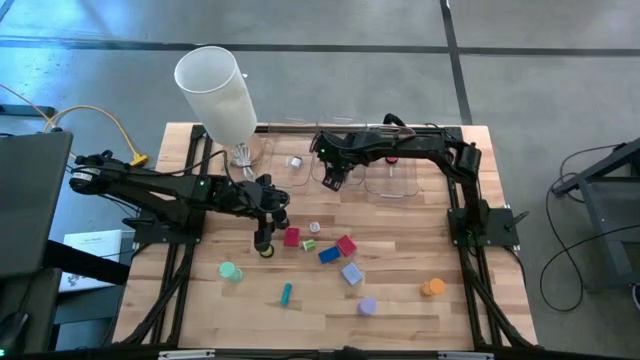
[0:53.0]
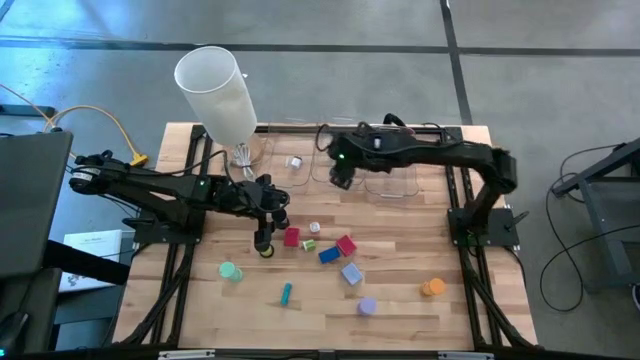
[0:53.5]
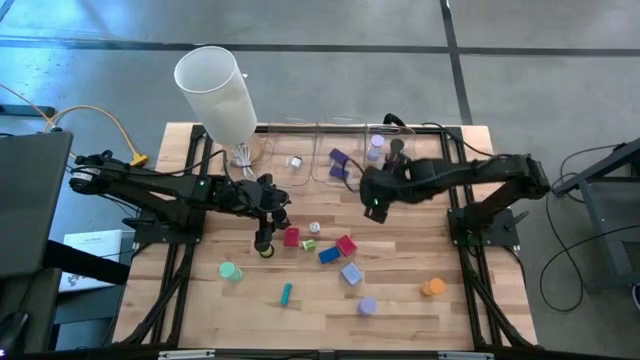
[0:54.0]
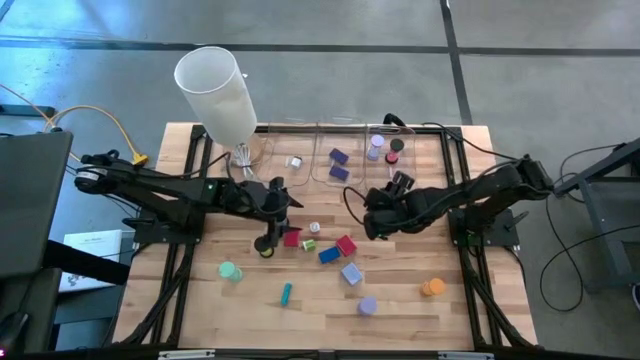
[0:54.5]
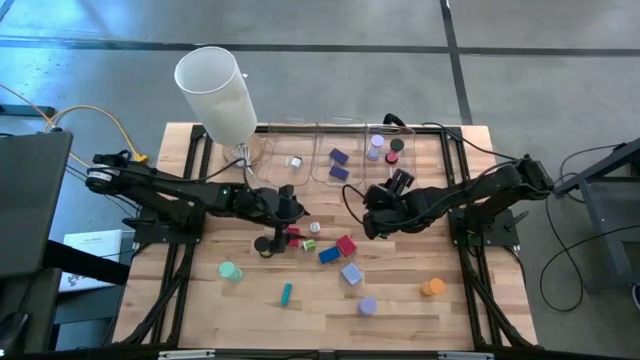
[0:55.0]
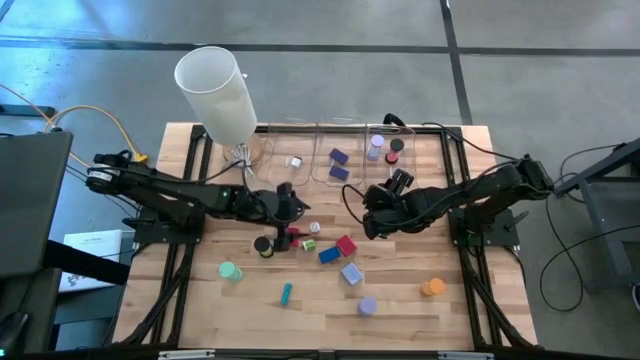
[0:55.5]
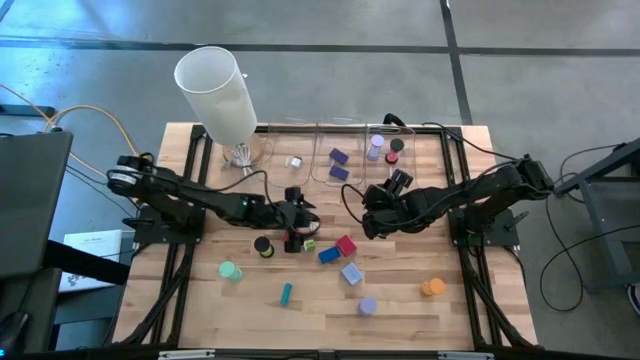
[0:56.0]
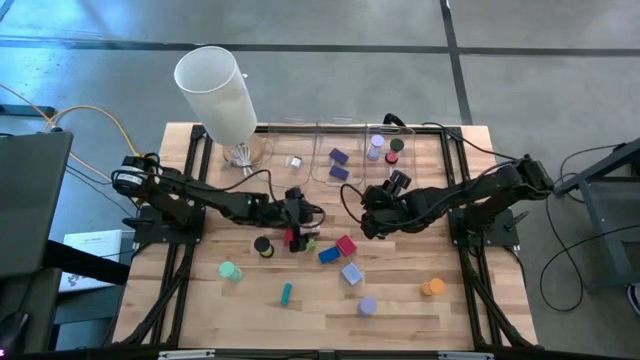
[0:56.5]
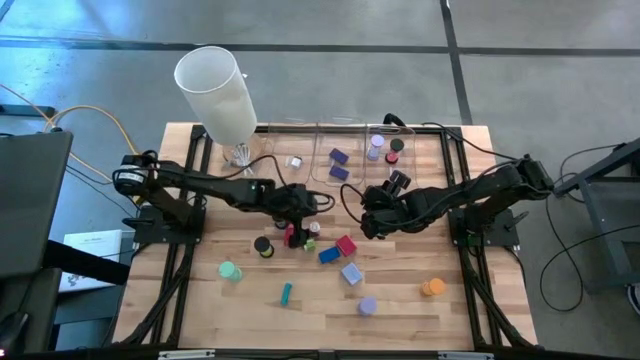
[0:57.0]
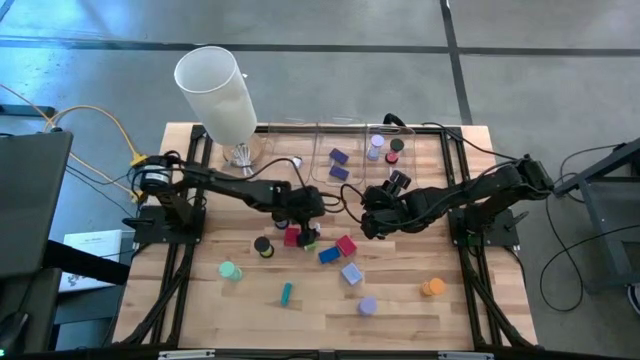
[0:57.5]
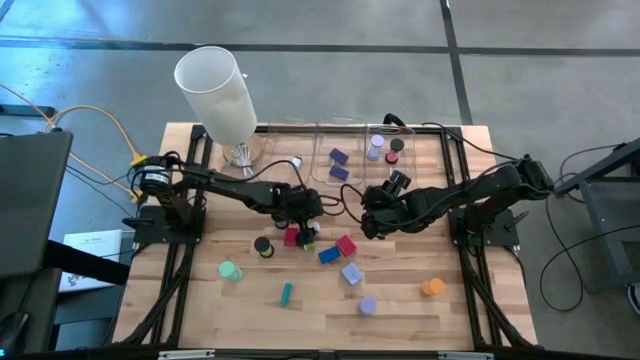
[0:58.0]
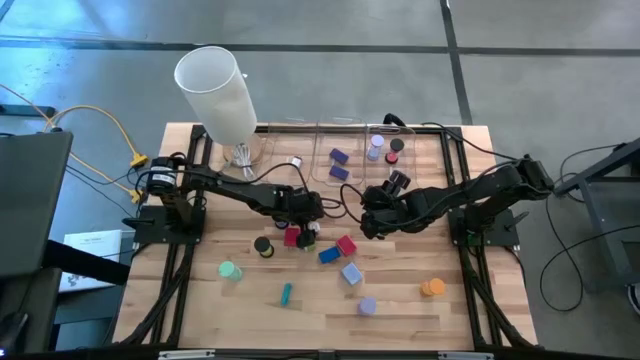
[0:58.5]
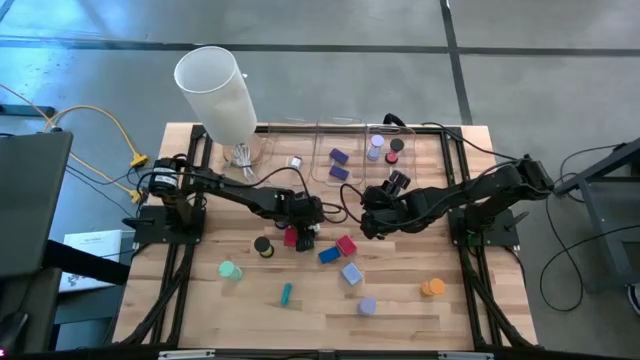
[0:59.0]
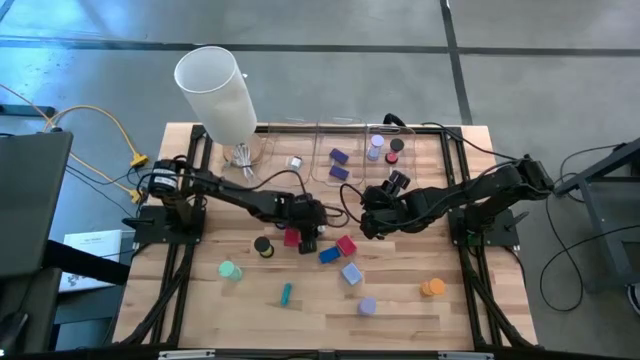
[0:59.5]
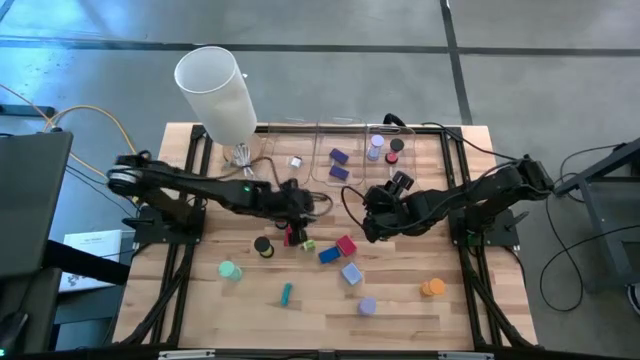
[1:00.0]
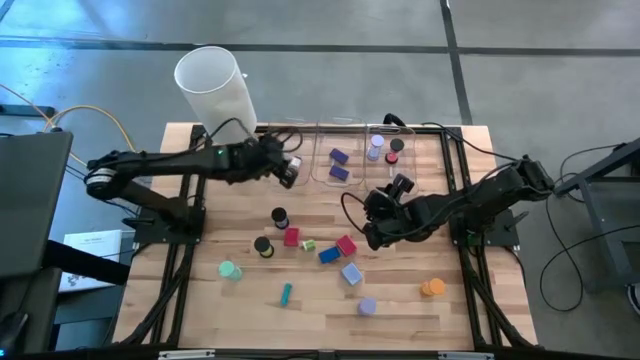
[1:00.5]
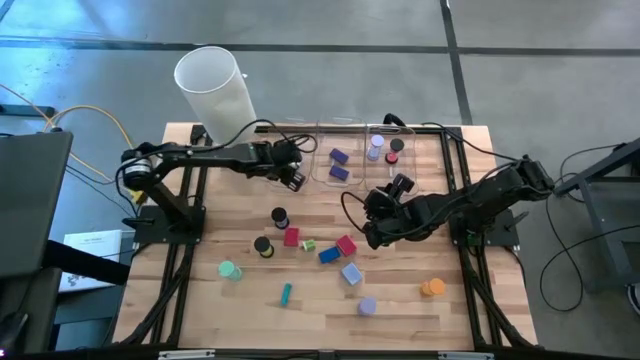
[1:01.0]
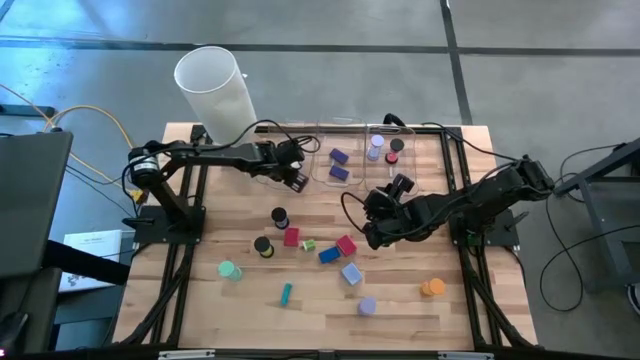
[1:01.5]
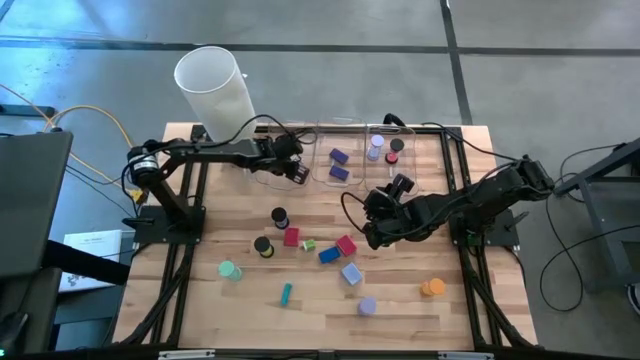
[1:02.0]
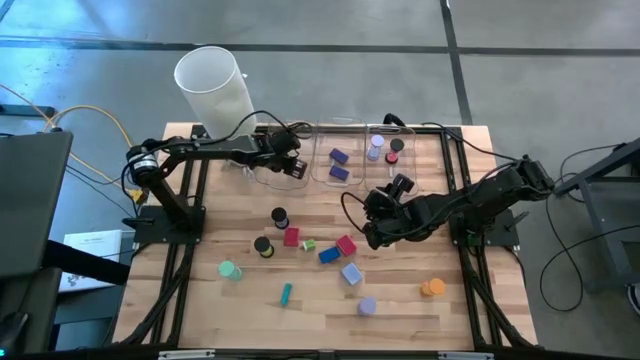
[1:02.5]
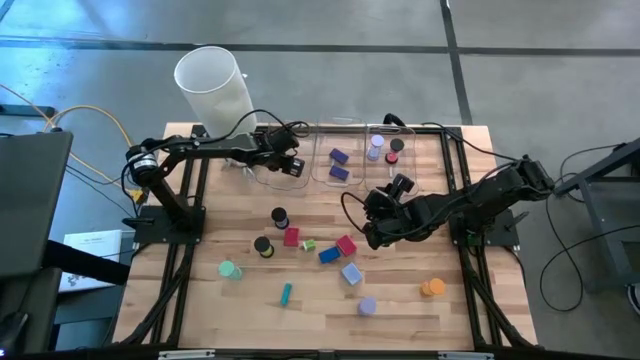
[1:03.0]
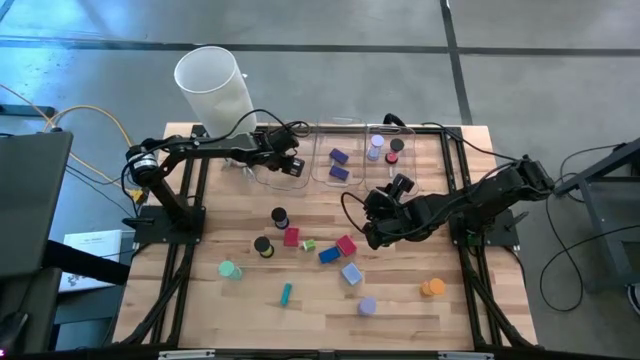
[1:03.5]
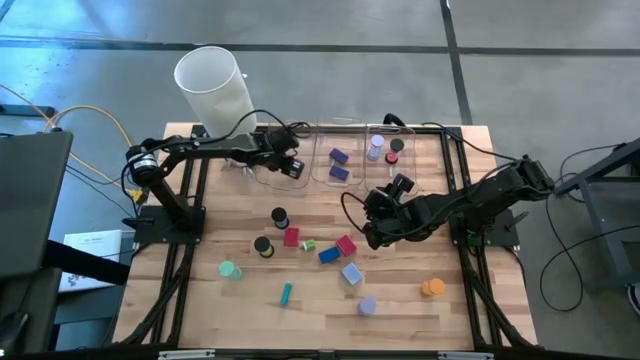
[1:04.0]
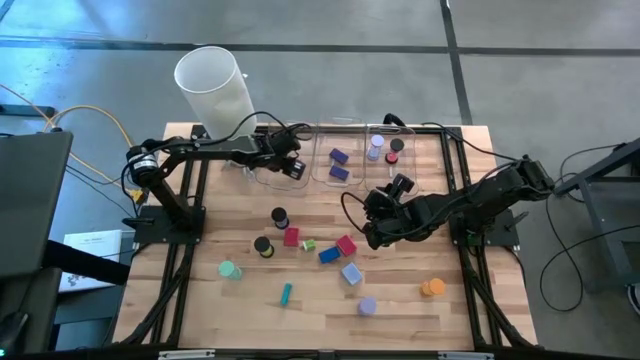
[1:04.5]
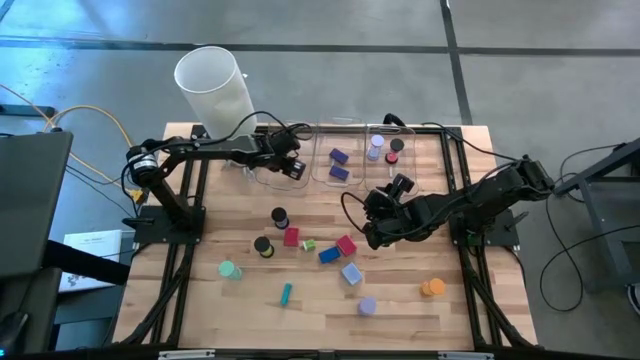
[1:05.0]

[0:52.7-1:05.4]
Task: Pick & Place Office items
Put the pink charger adapter into the left transparent bin

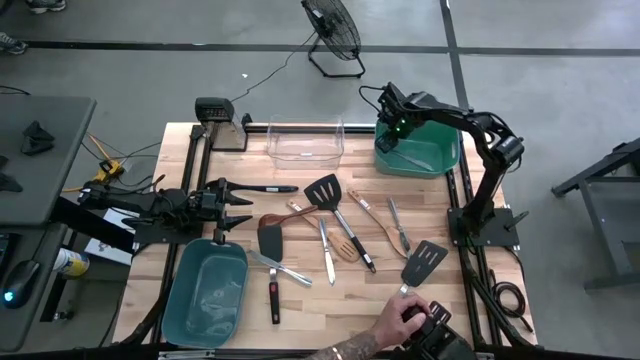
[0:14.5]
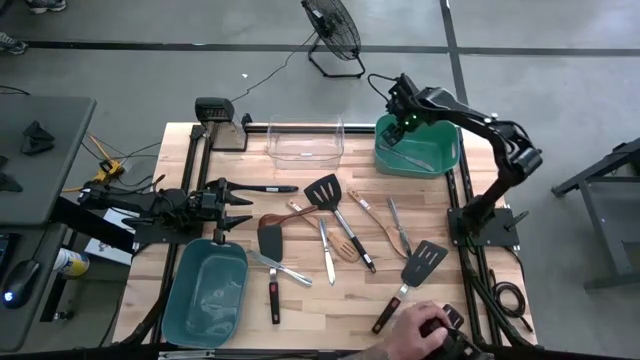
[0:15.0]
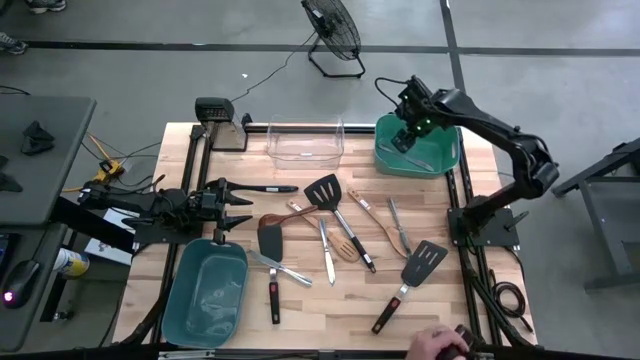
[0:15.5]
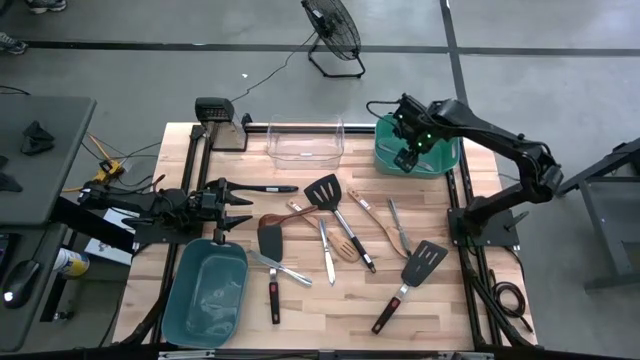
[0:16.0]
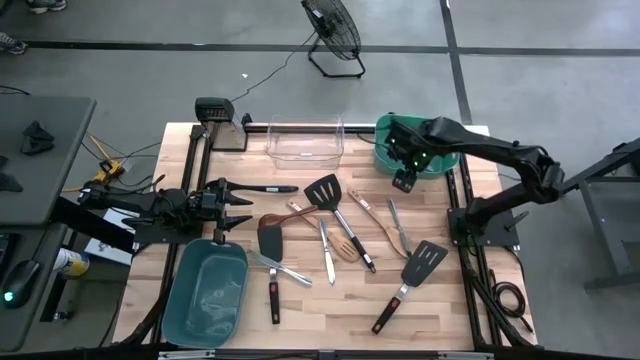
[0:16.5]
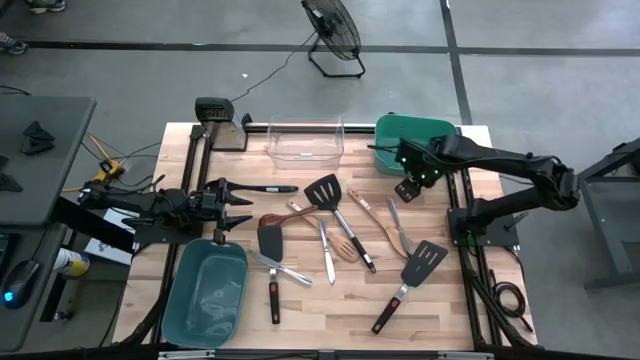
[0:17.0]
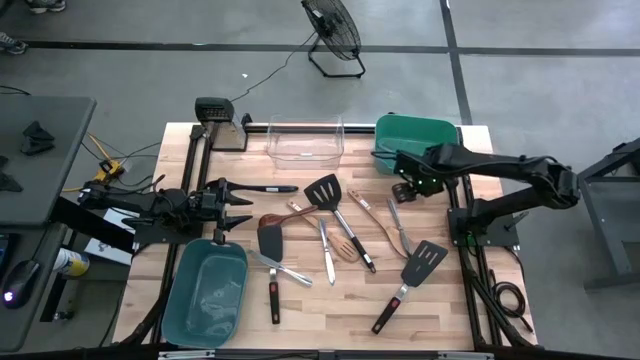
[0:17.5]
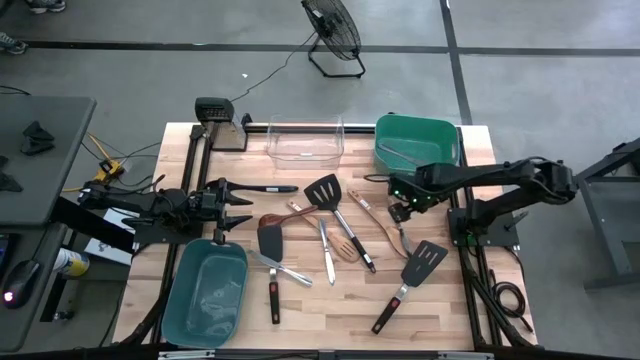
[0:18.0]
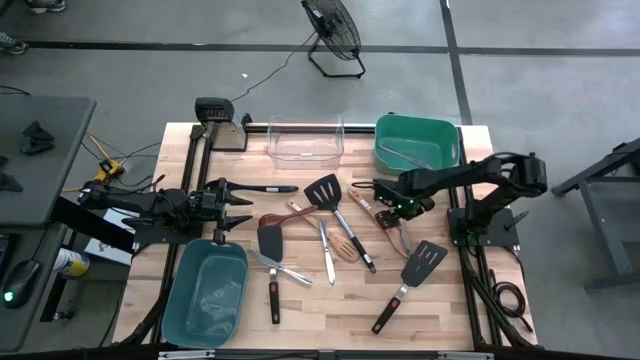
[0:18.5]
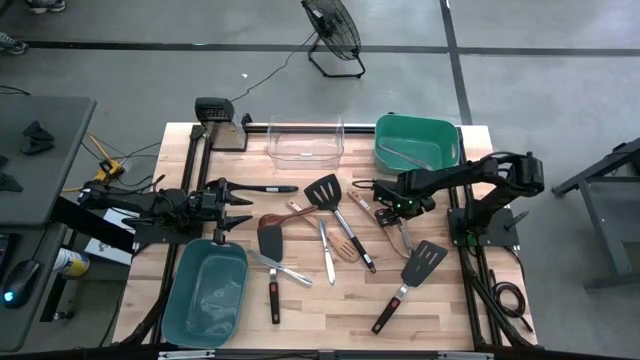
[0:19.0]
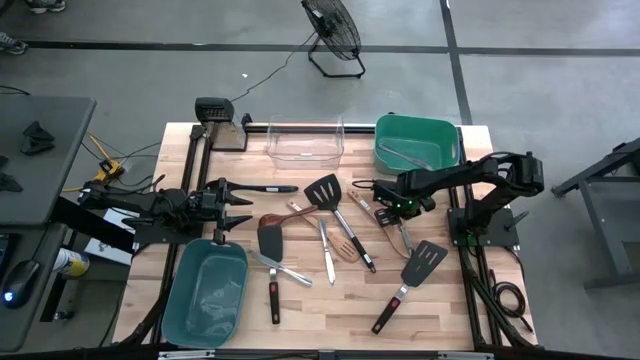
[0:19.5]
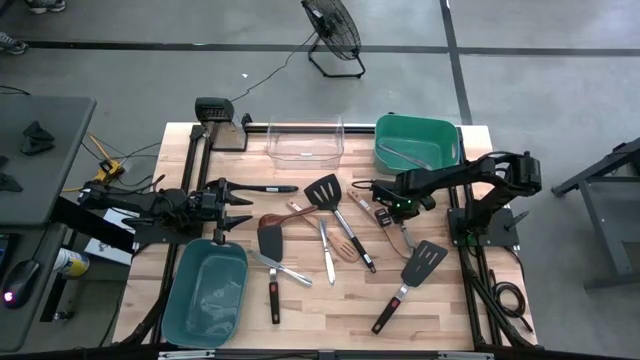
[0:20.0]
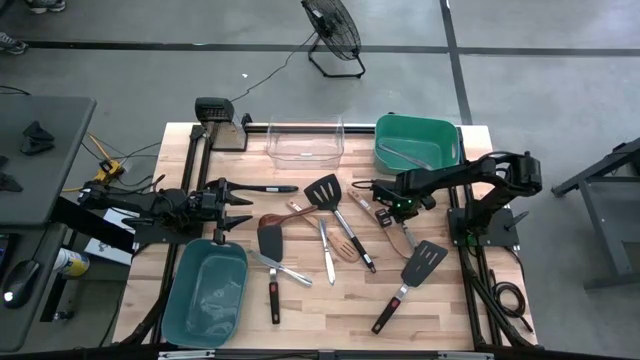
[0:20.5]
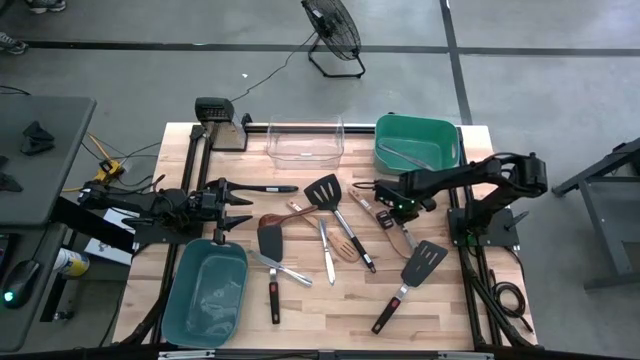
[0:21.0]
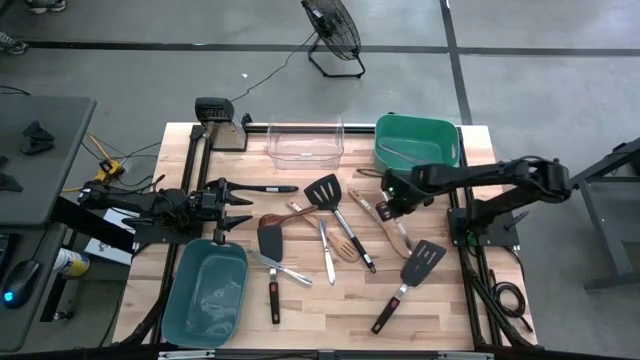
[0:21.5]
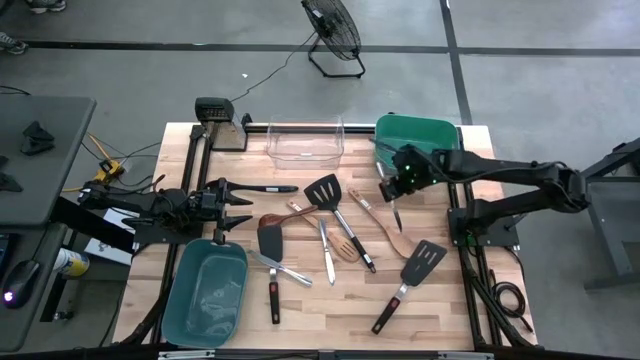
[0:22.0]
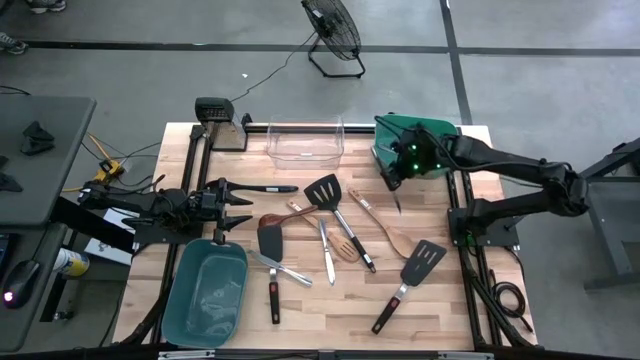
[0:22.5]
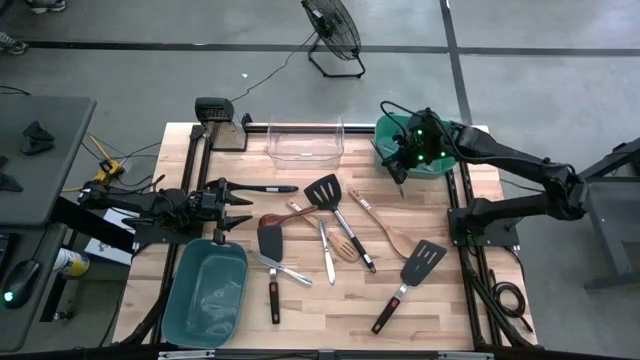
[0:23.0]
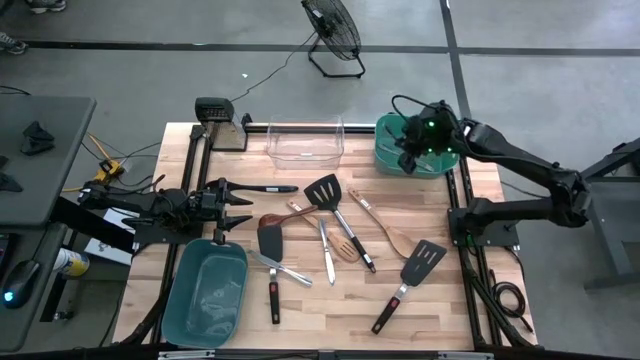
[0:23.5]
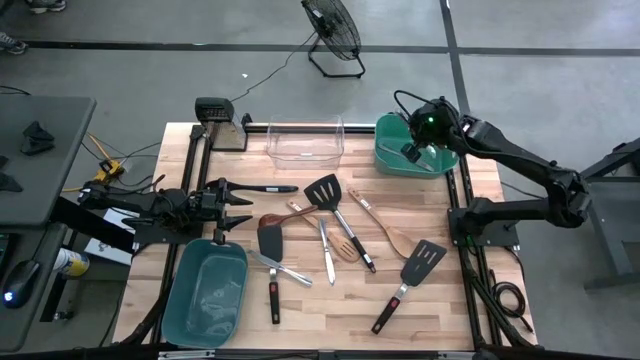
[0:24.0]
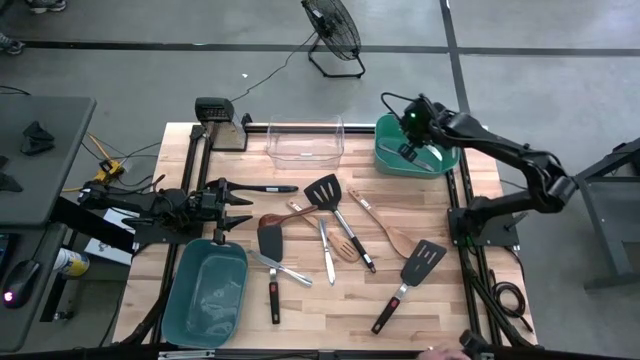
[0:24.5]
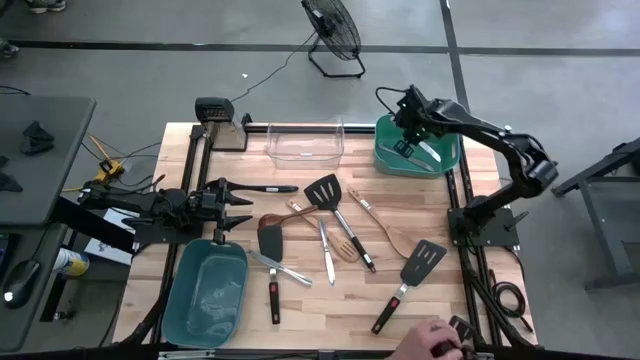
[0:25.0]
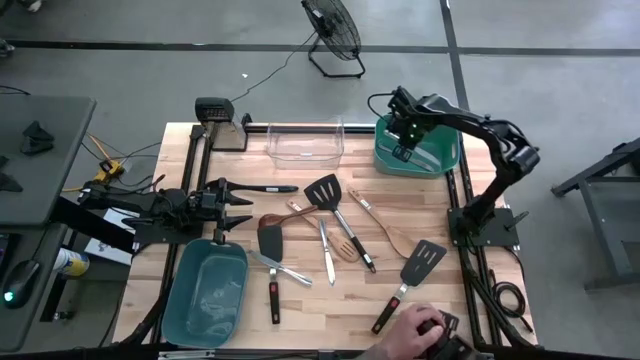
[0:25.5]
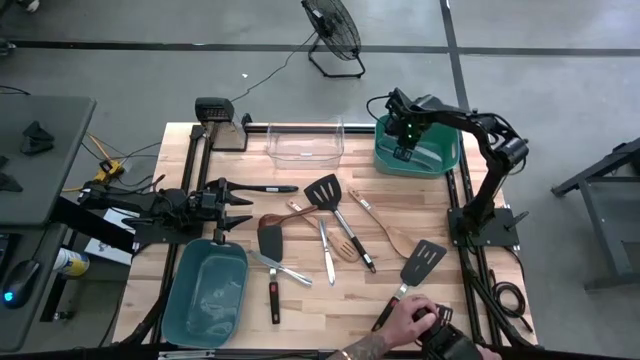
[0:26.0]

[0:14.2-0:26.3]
Task: Pick & Place Kitchen Items
Put the right dinner knife into the green bin
